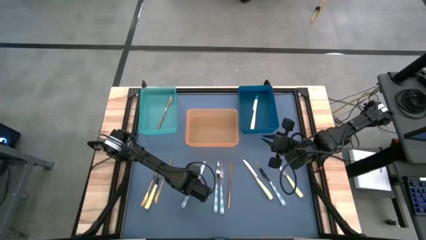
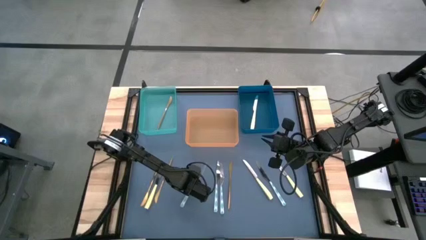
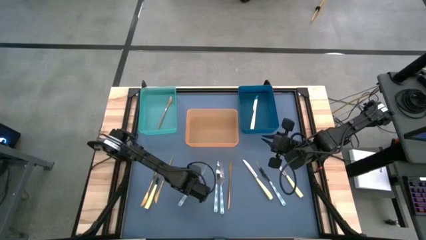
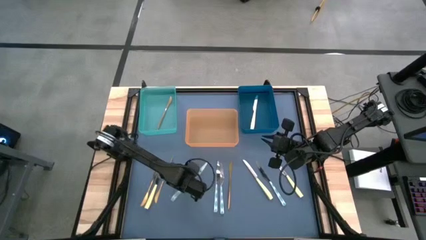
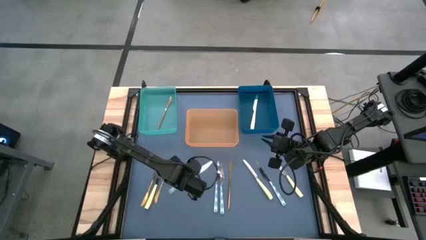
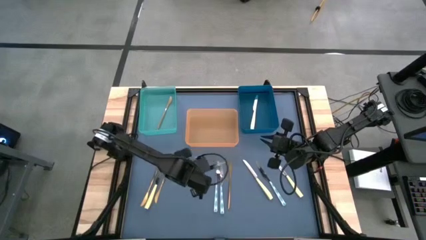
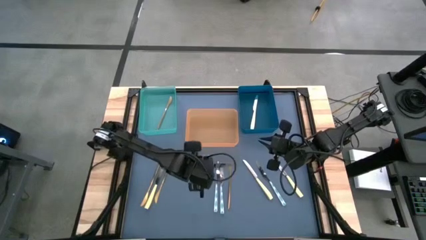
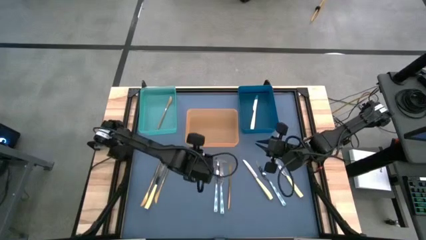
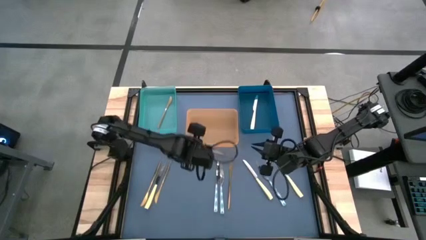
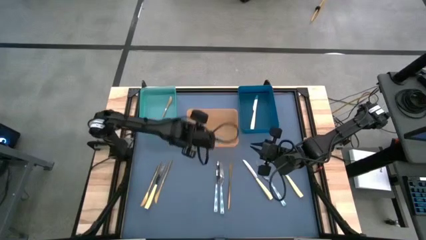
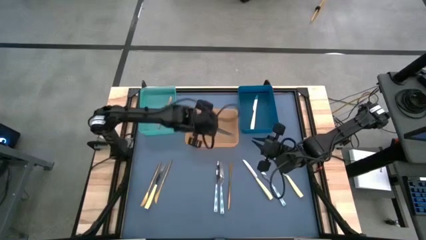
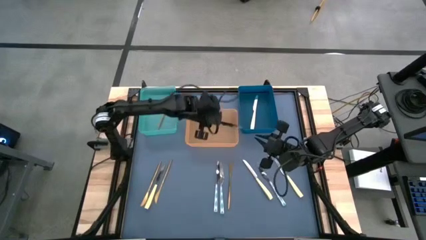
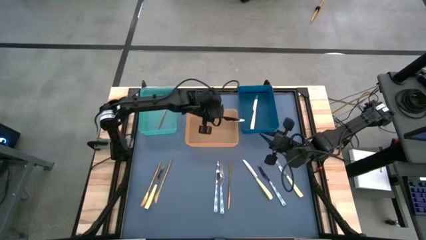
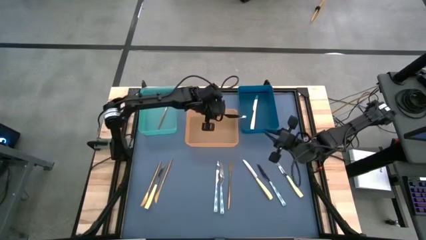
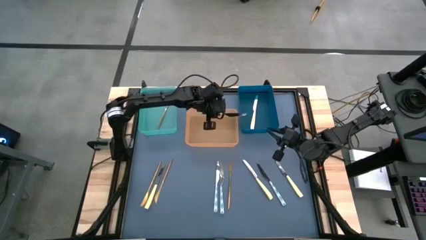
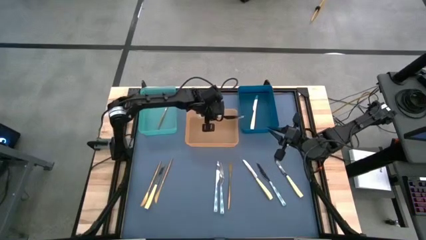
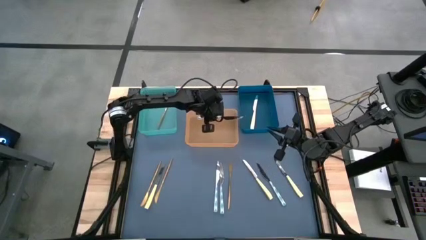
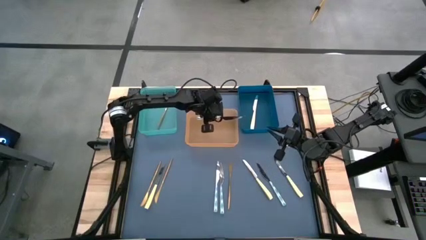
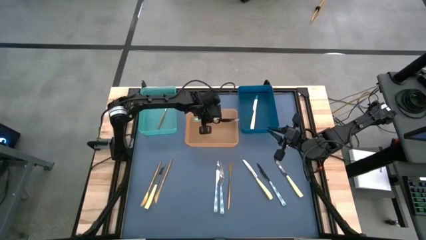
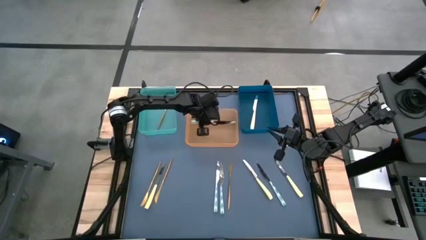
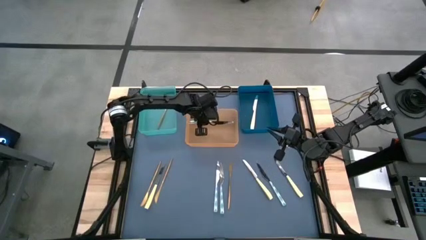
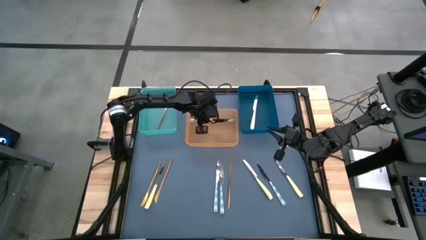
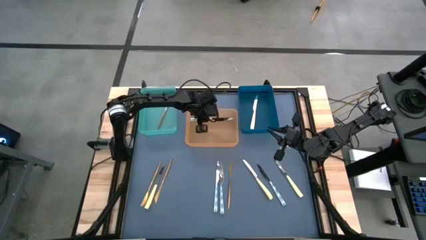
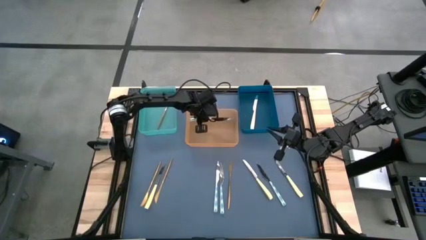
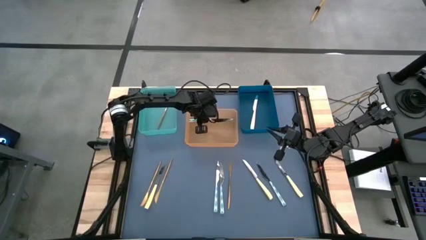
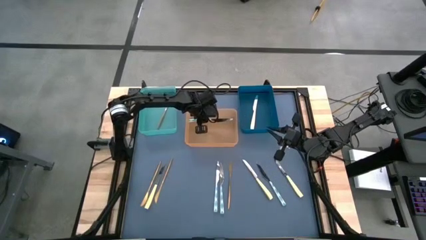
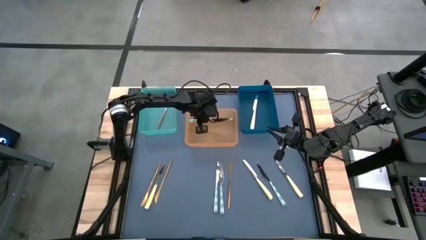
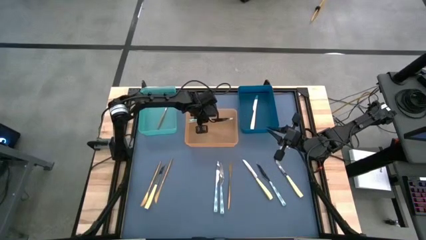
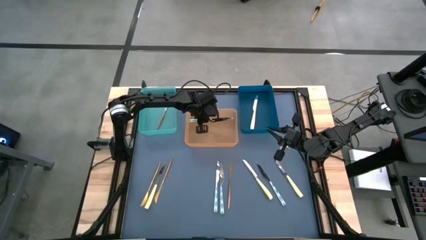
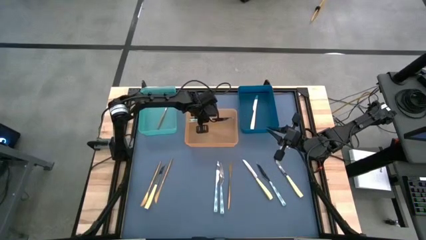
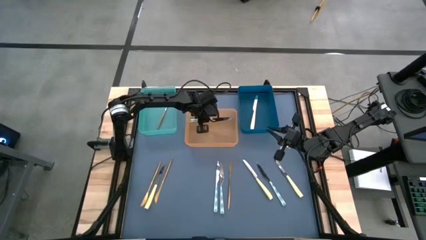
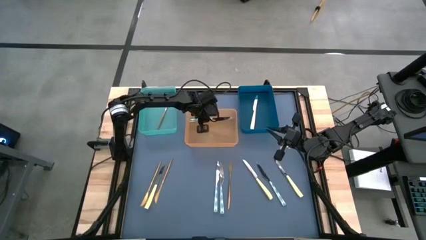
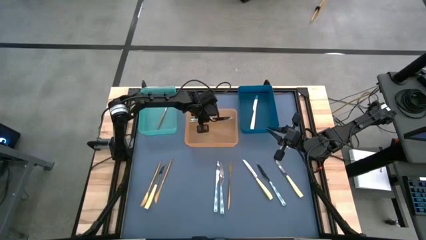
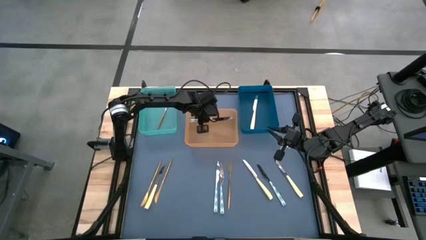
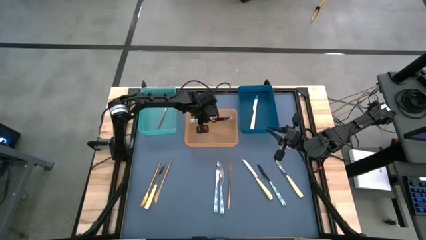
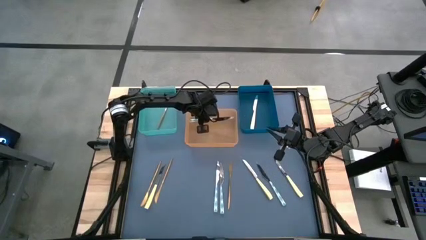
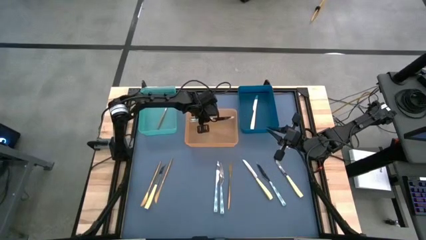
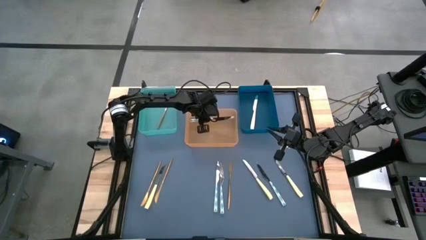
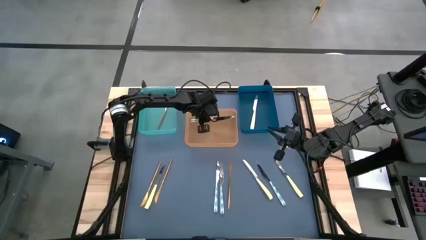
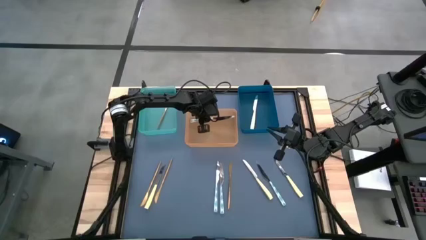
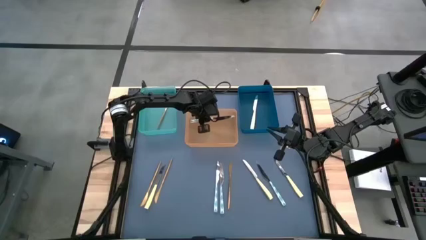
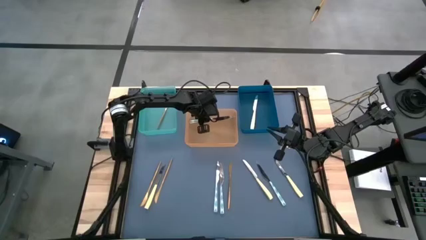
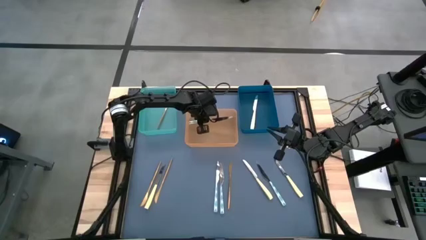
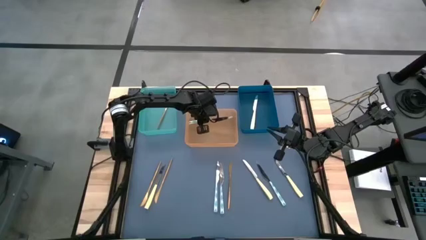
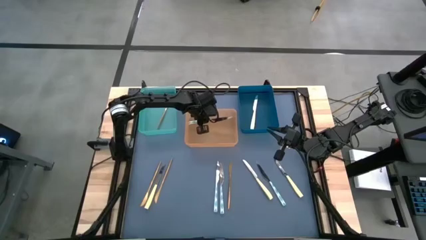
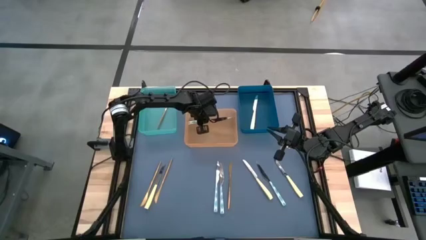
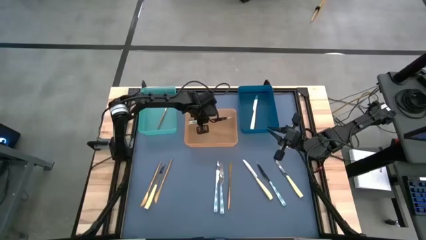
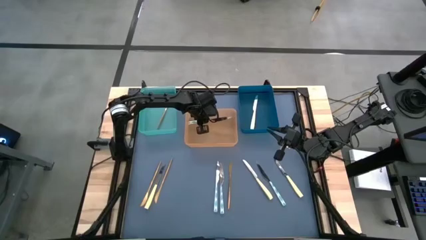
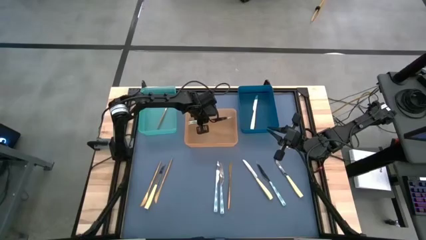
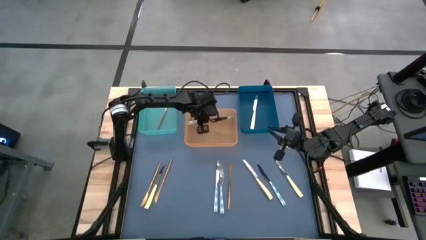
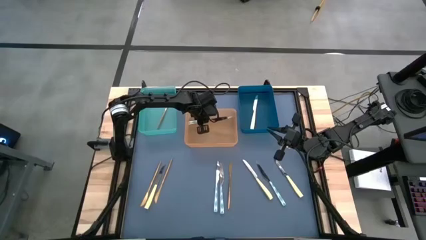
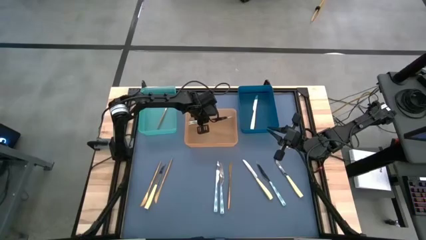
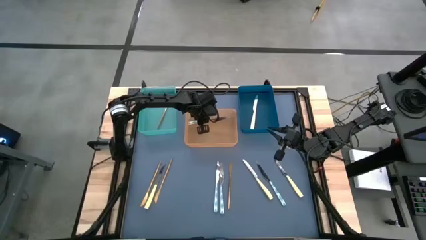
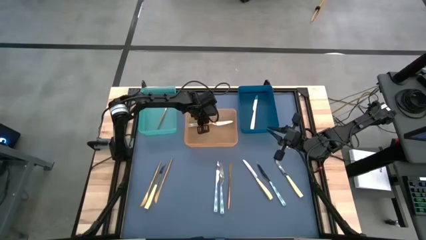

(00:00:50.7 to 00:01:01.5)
Task: Sort silverware by color (type)
Put the white knife in the orange bin

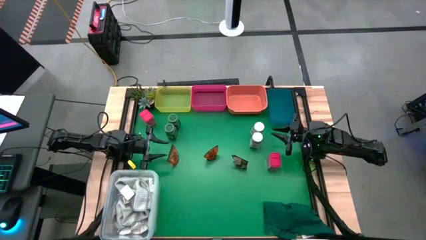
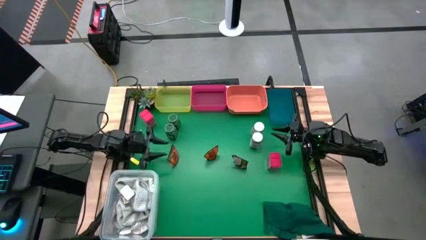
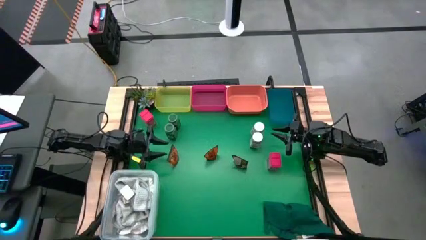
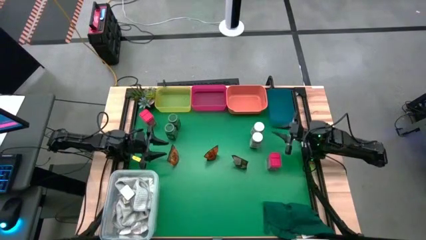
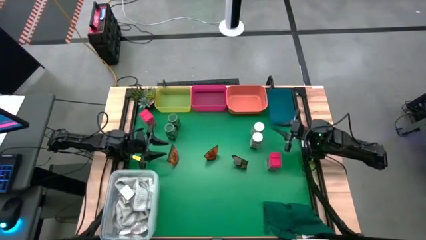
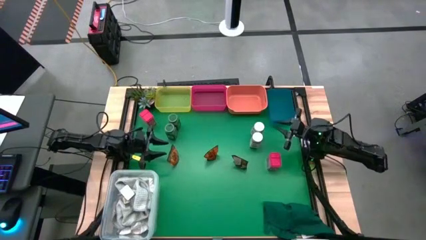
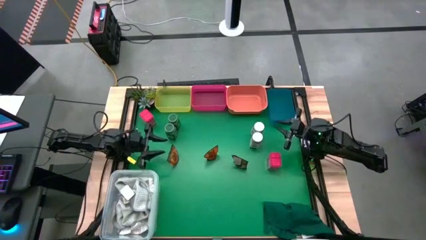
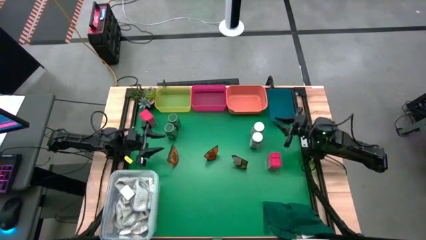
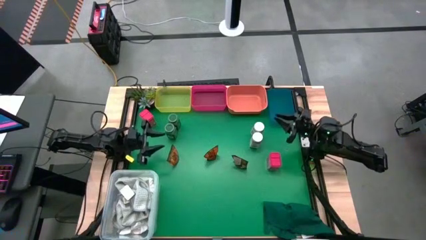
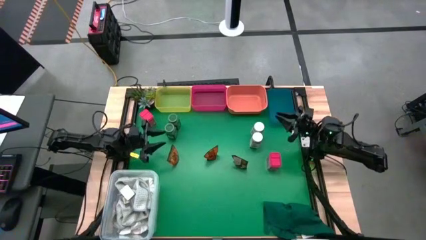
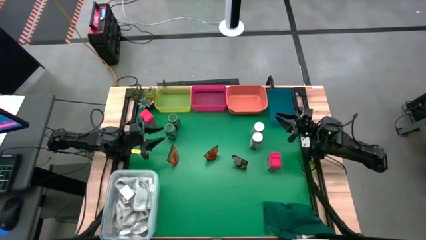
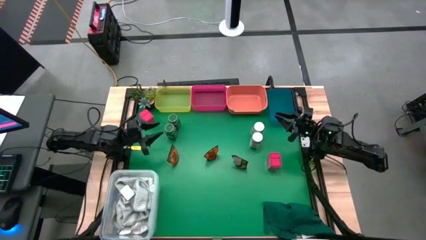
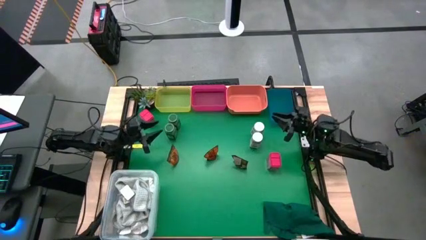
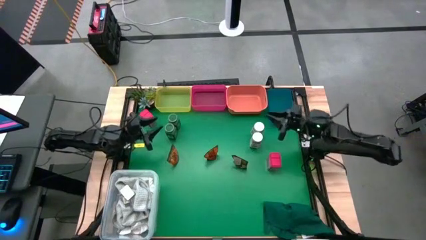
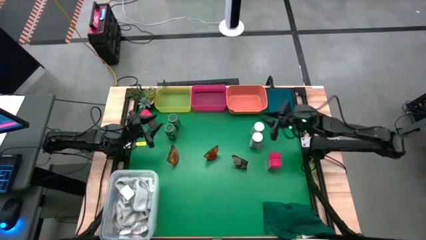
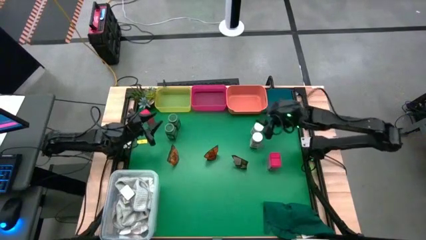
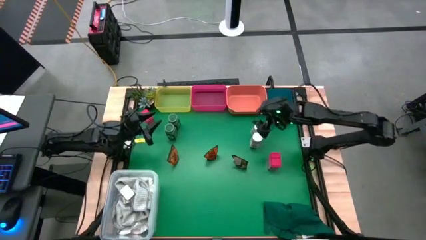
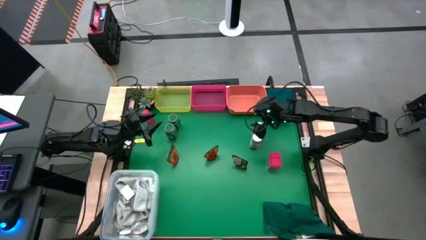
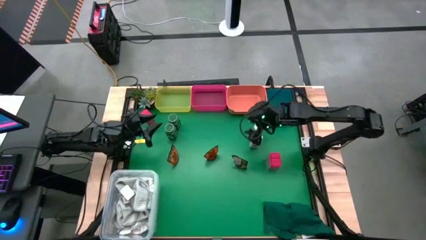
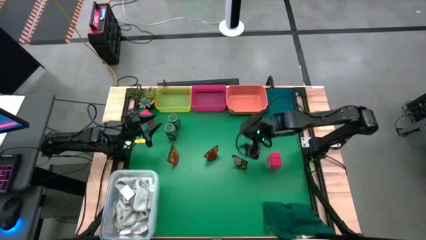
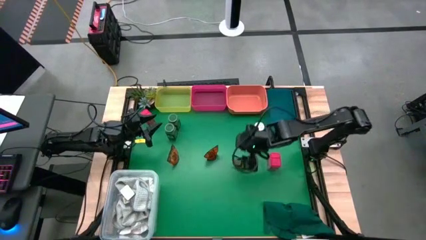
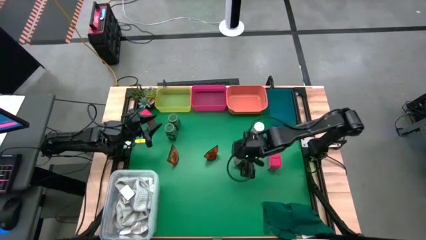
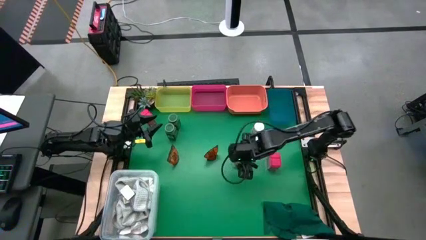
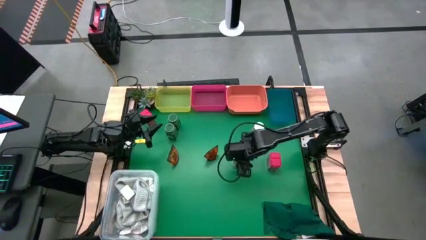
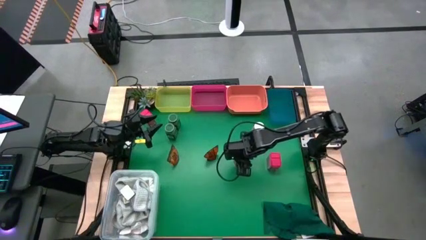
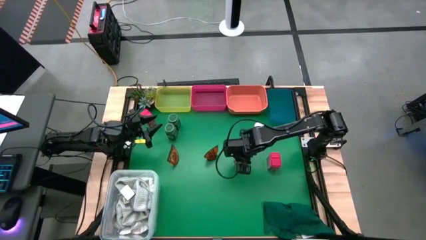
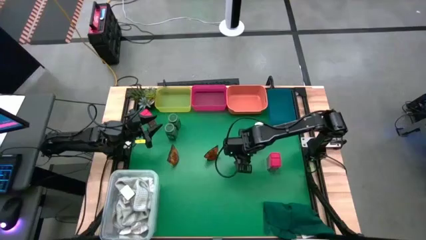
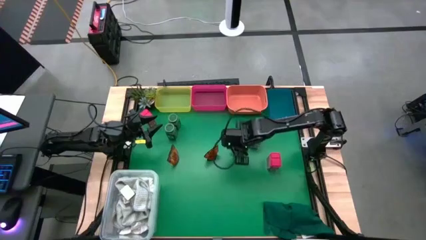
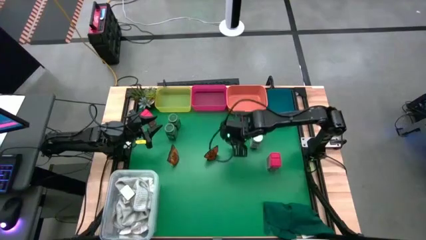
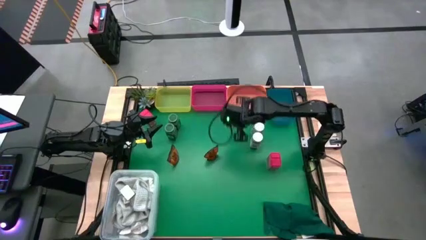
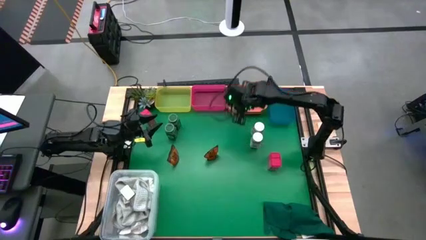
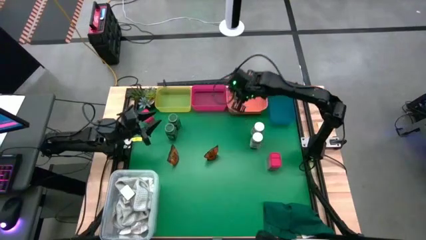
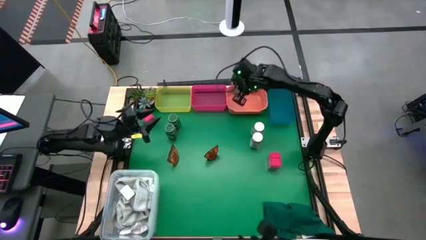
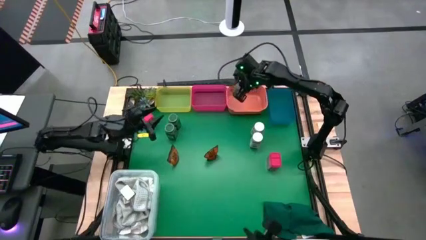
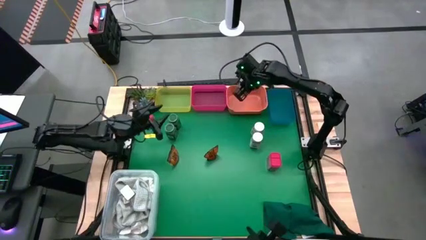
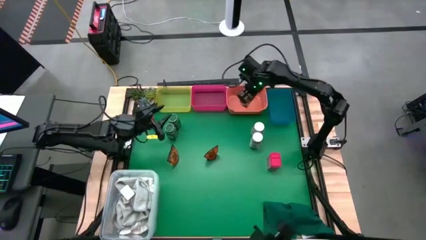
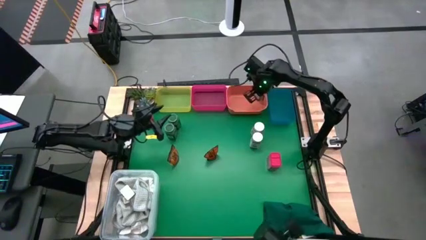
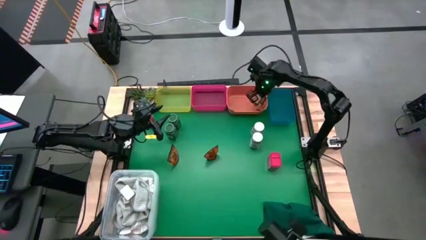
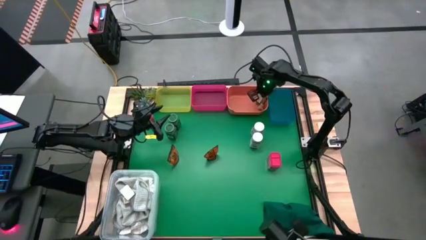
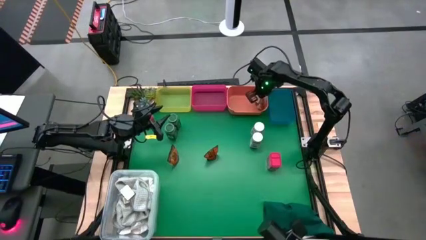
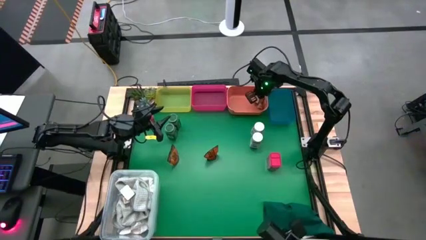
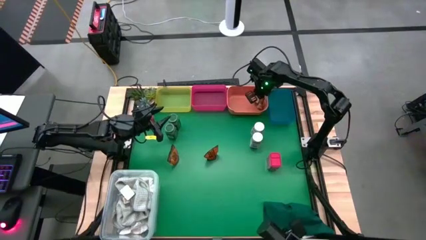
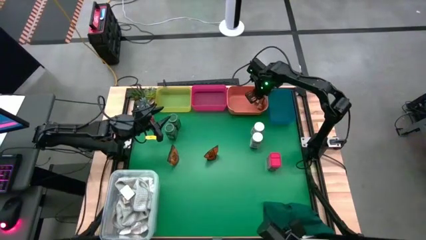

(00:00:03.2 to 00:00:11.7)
Task: Sort spices by type
Put the right orange seasoning pack into the orange bin
